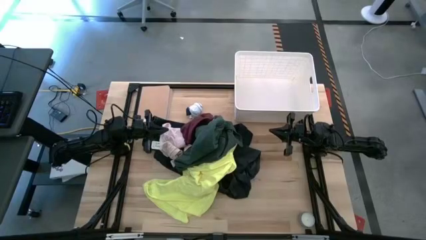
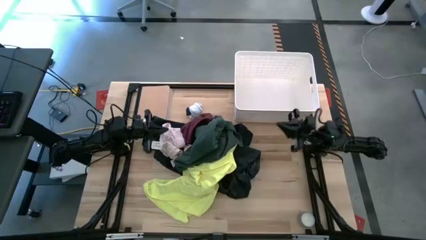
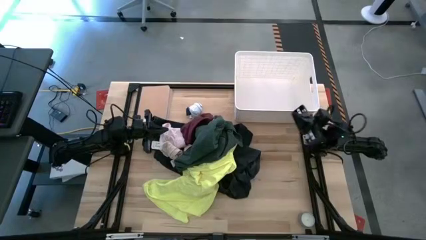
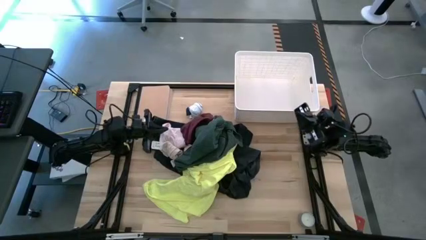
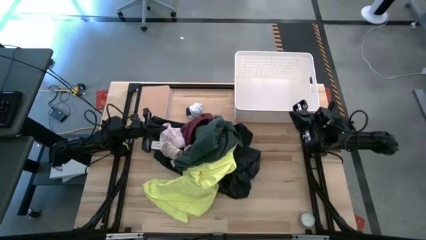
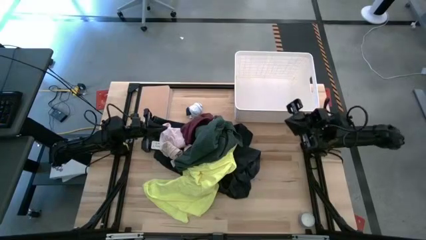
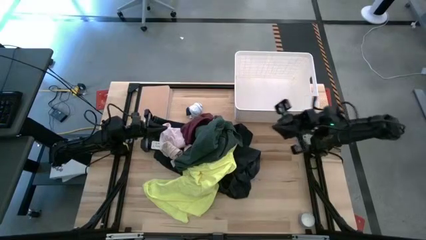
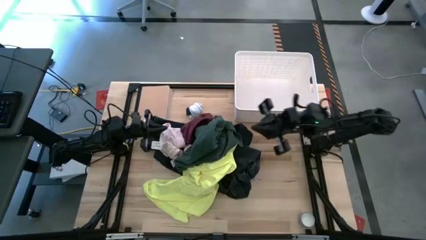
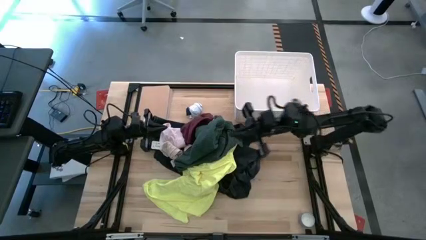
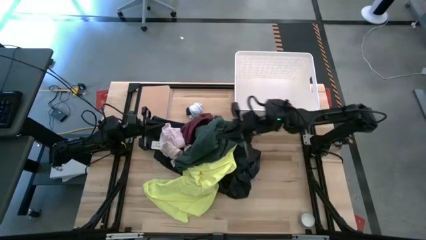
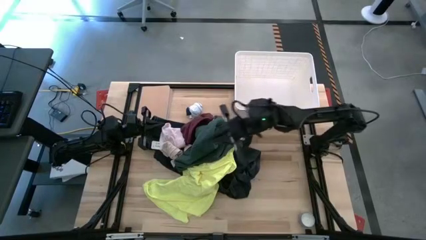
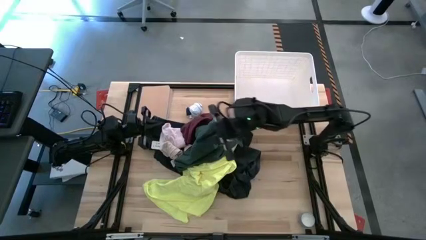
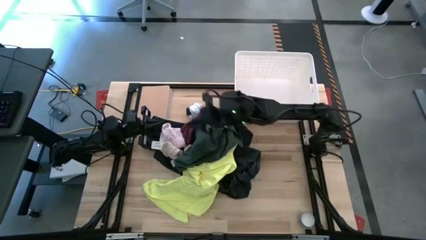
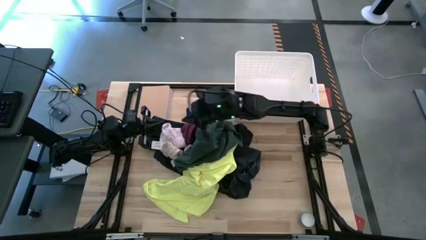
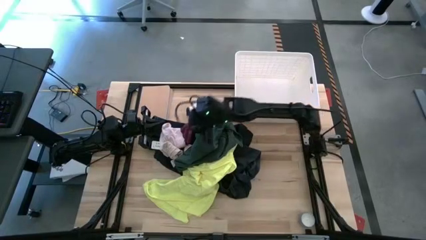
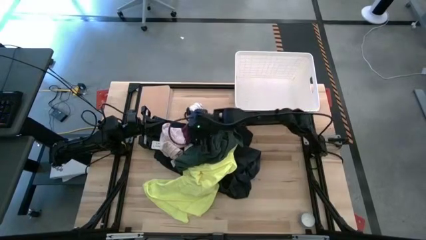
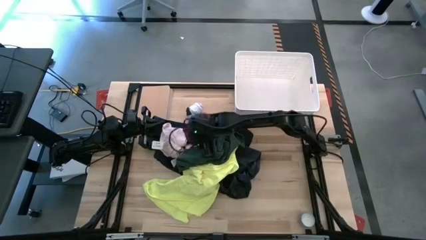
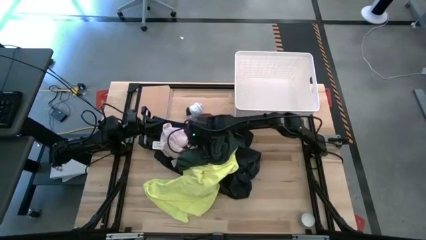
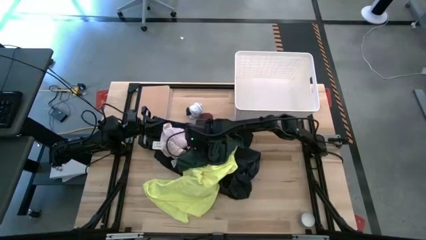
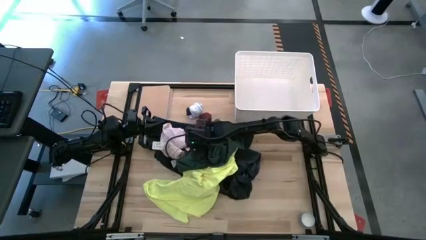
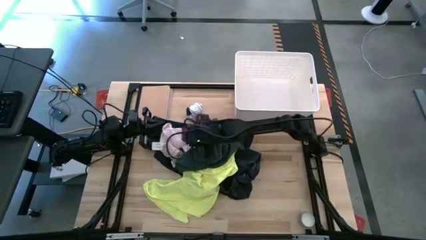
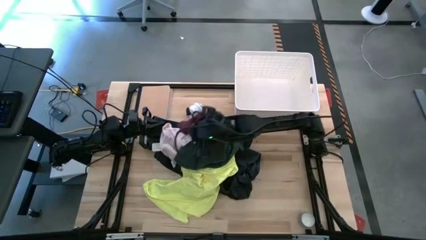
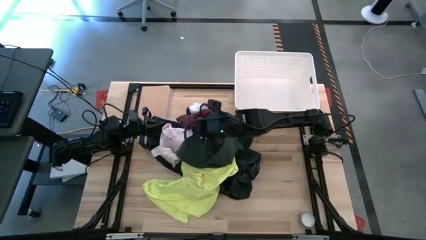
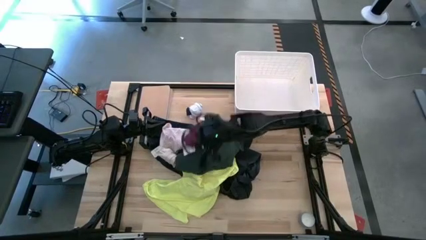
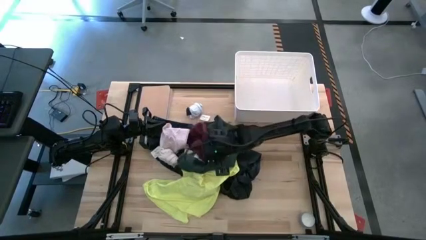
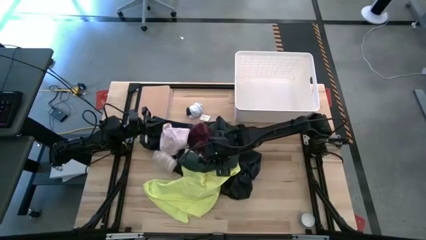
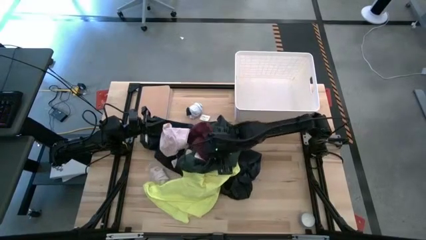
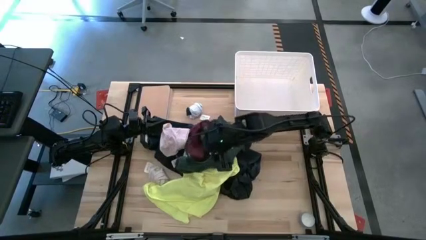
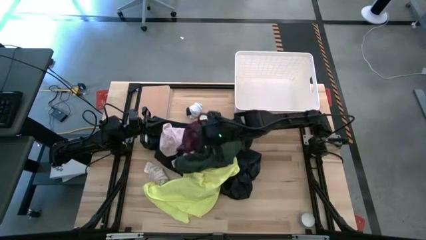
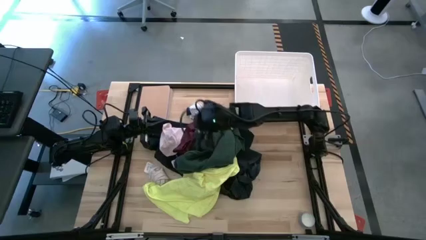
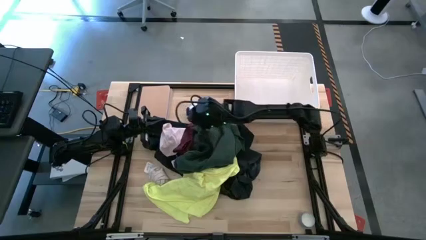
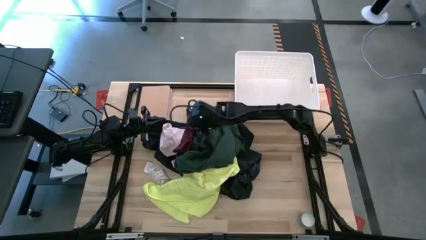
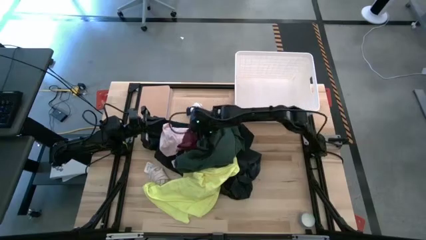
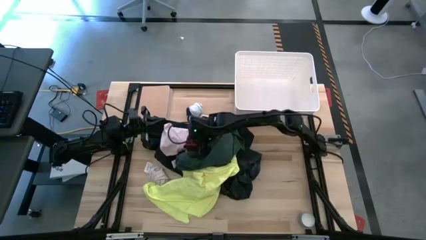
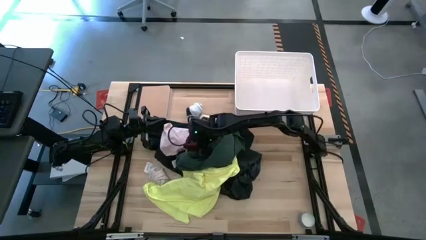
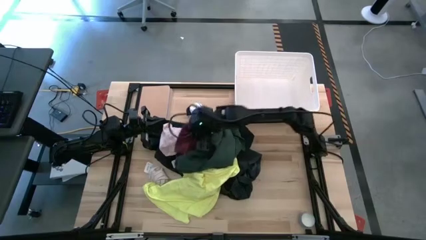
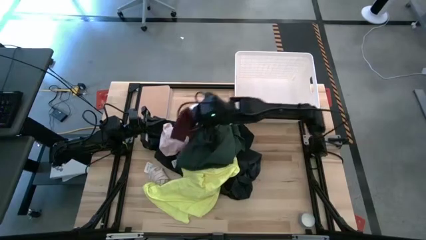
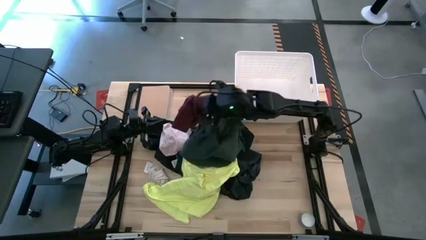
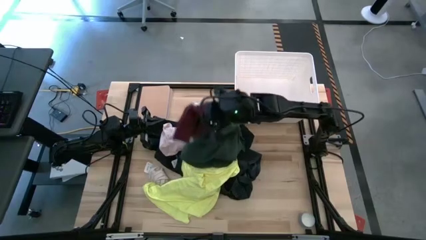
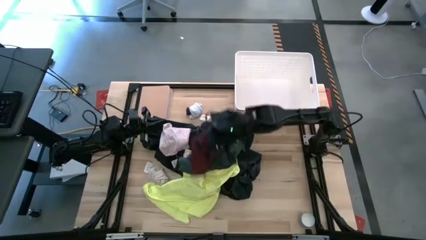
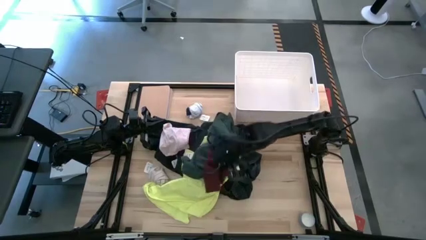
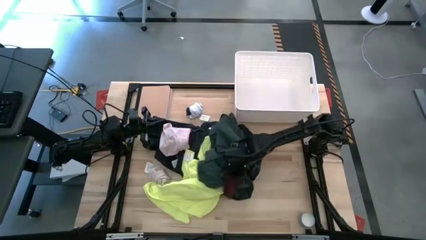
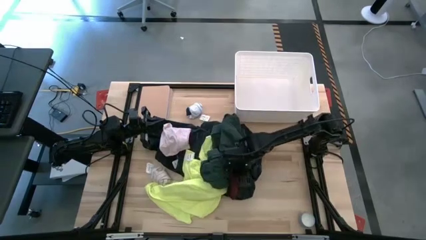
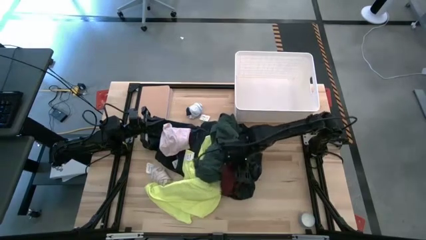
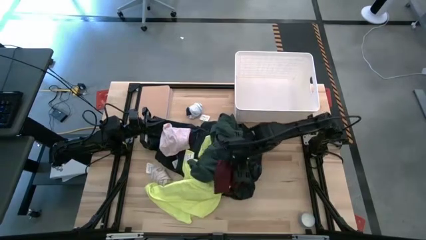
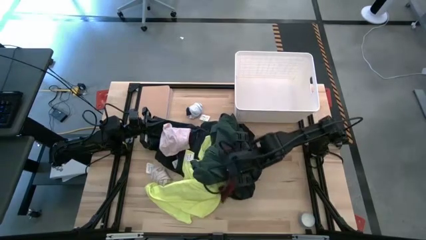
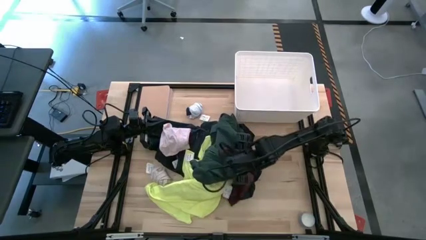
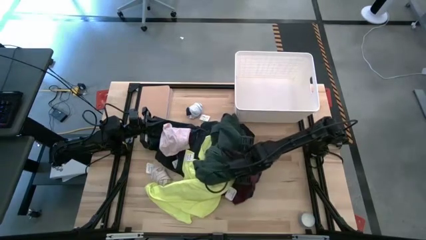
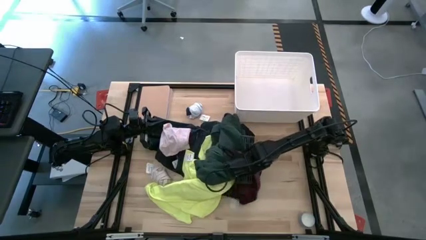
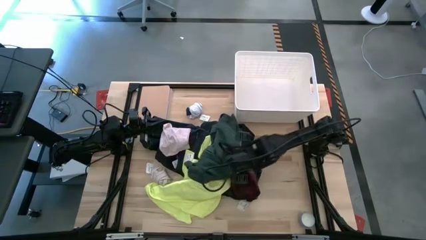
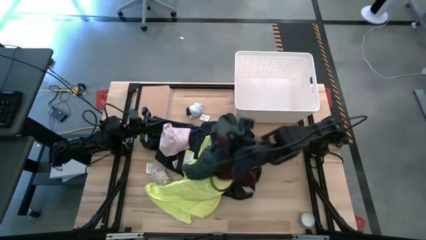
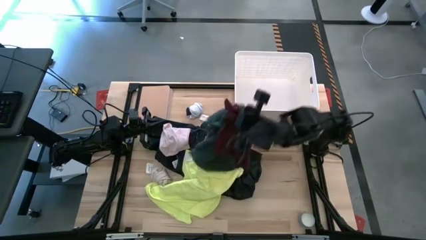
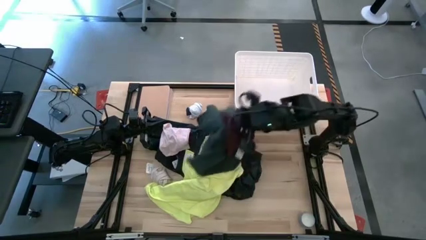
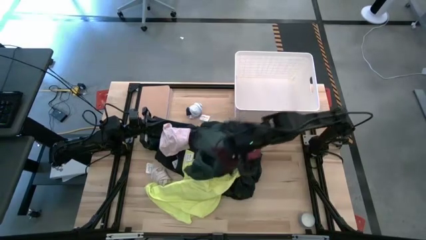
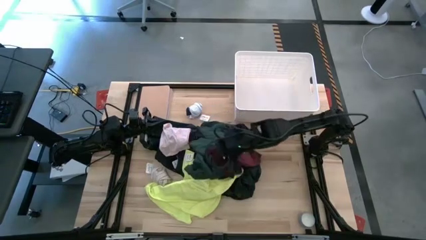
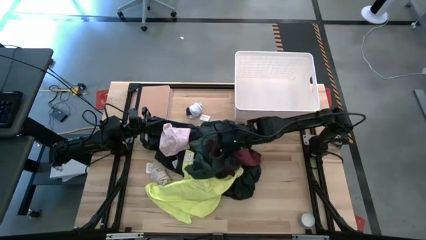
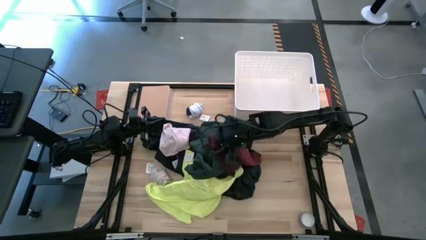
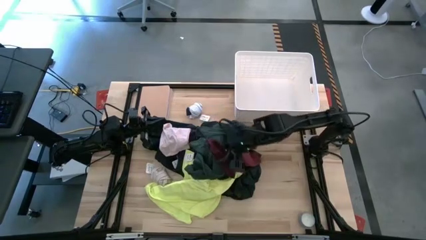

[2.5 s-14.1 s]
Task: Sort clothes
Put the red underwear into the white laundry bin

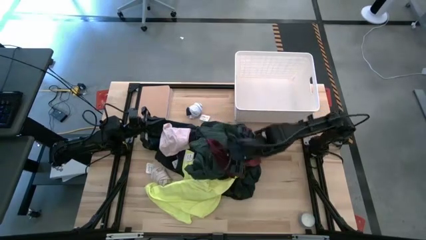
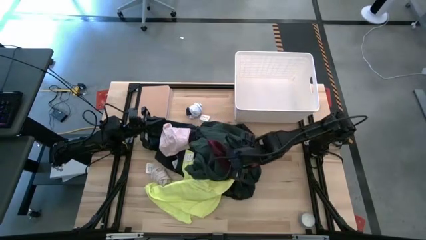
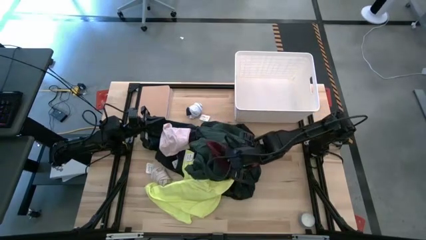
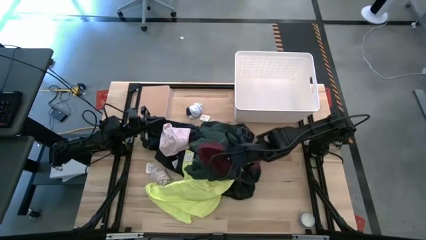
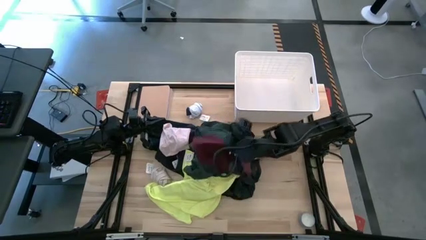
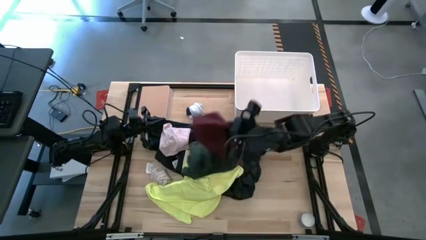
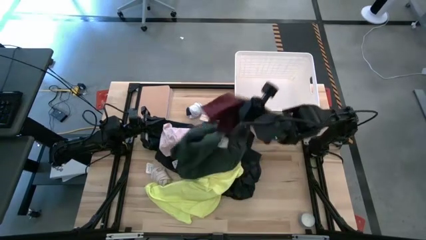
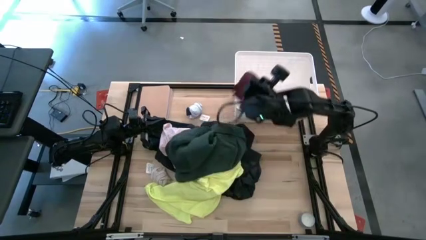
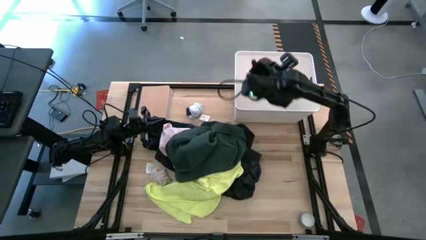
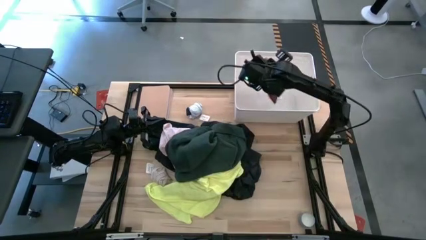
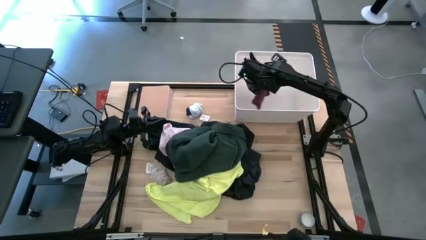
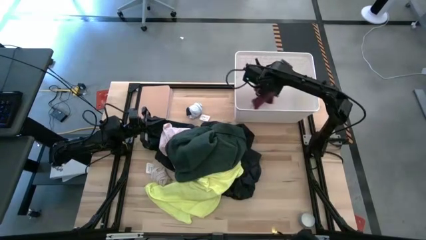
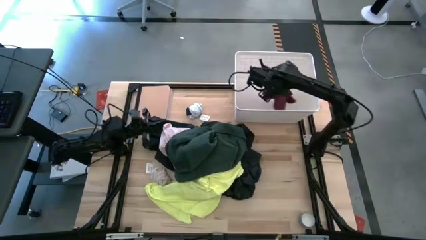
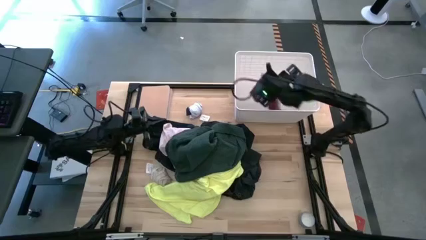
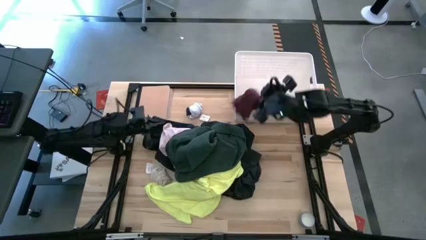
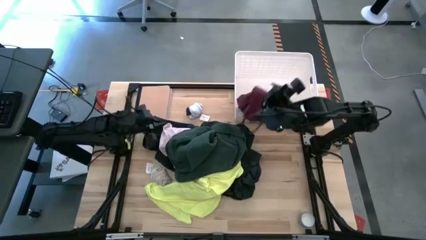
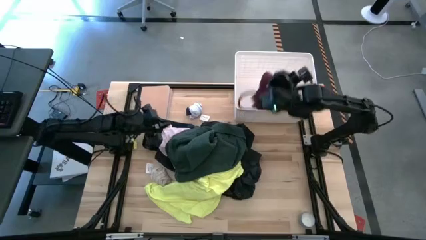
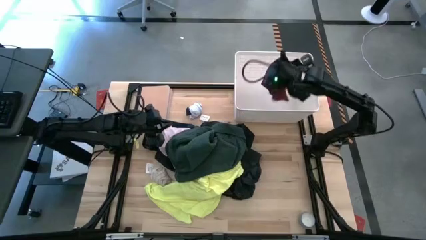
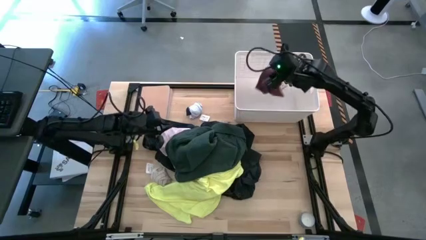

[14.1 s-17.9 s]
Put the red underwear into the white laundry bin
